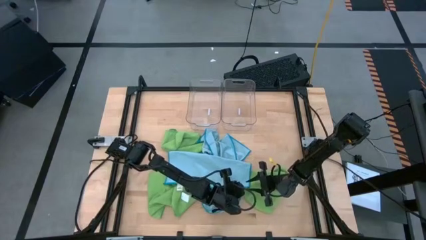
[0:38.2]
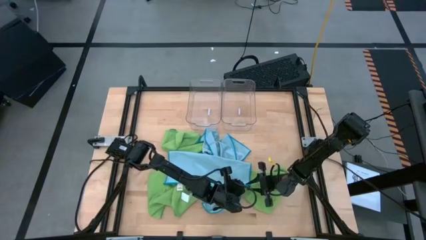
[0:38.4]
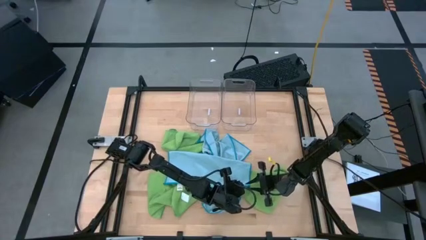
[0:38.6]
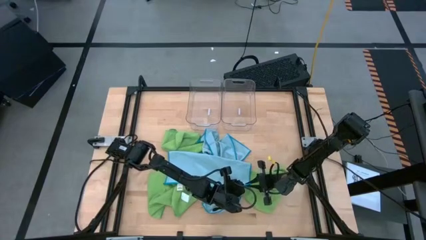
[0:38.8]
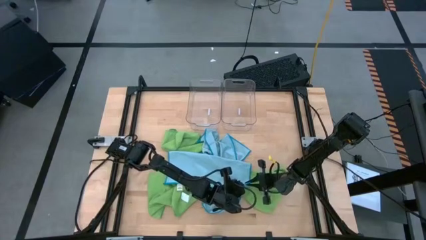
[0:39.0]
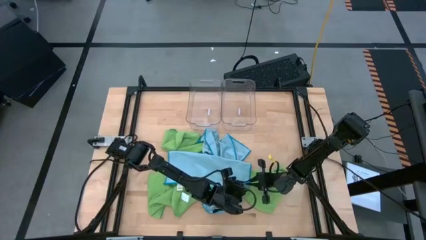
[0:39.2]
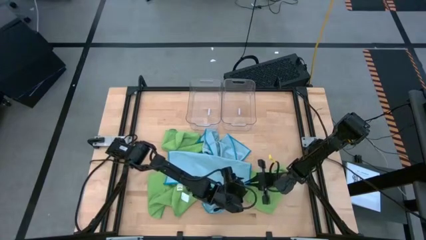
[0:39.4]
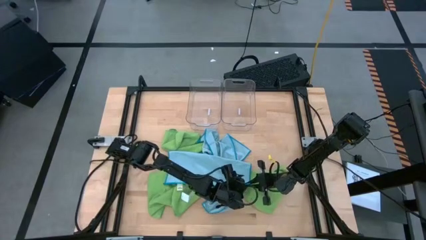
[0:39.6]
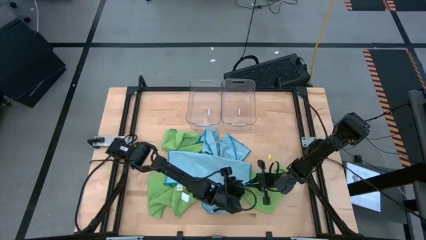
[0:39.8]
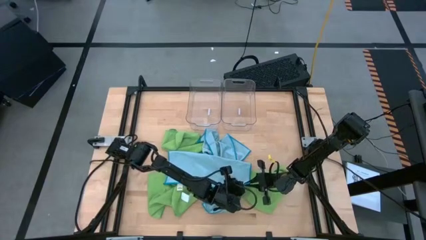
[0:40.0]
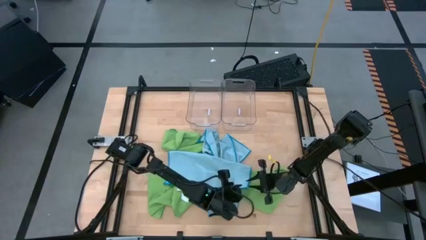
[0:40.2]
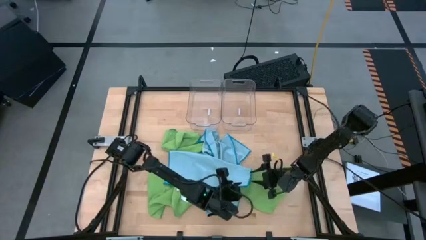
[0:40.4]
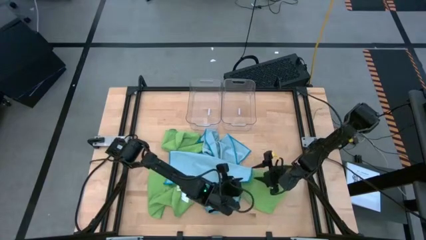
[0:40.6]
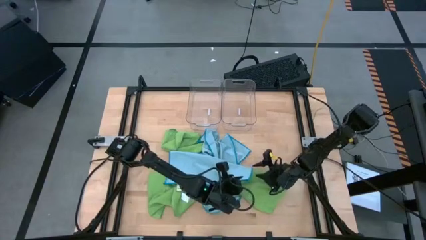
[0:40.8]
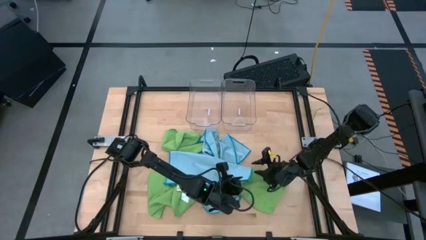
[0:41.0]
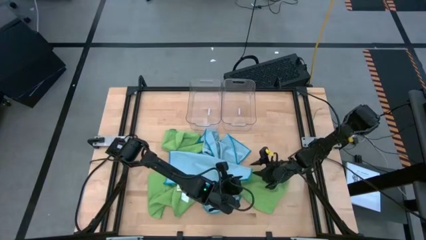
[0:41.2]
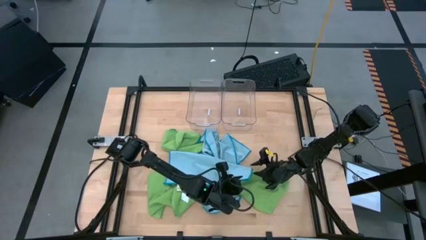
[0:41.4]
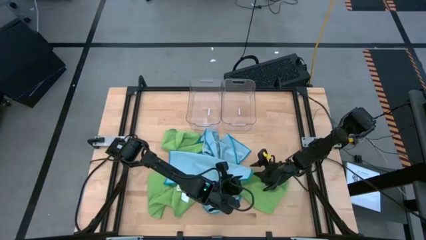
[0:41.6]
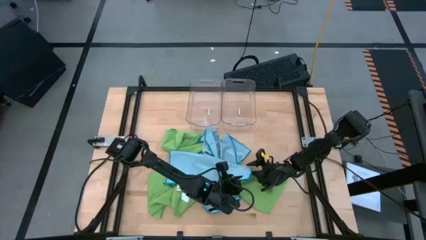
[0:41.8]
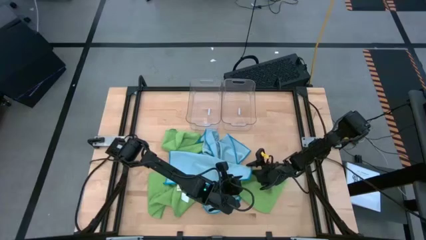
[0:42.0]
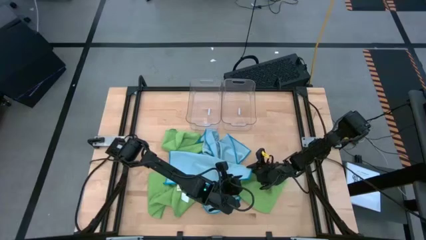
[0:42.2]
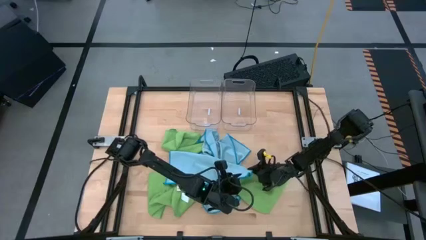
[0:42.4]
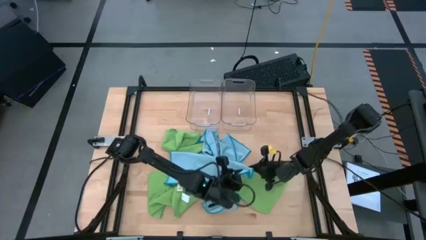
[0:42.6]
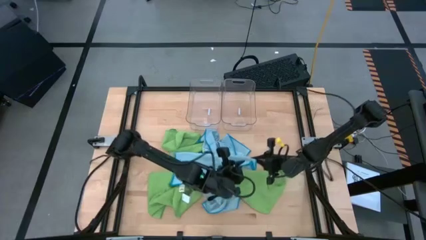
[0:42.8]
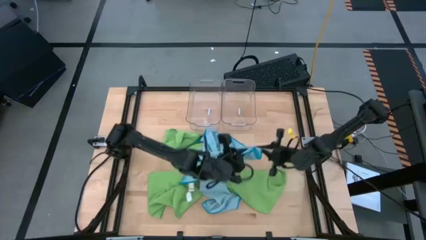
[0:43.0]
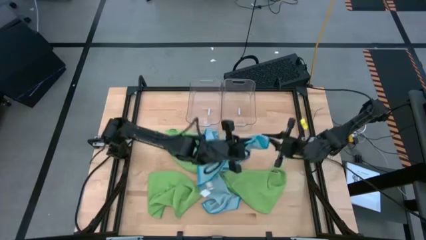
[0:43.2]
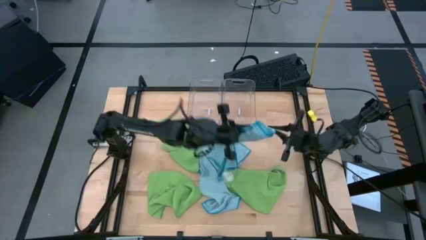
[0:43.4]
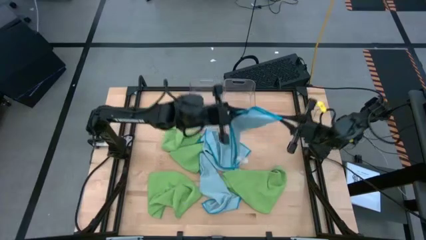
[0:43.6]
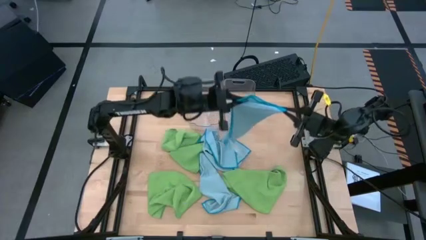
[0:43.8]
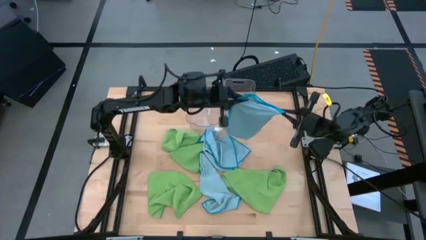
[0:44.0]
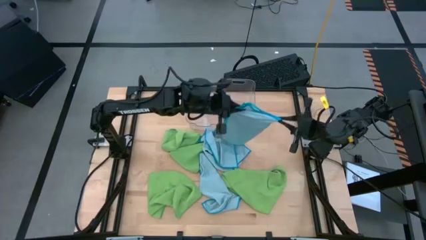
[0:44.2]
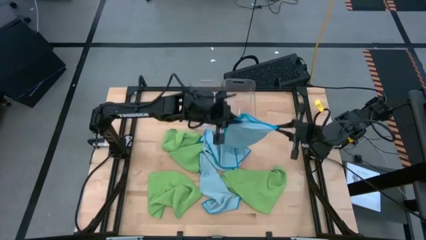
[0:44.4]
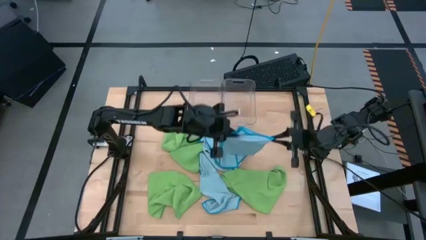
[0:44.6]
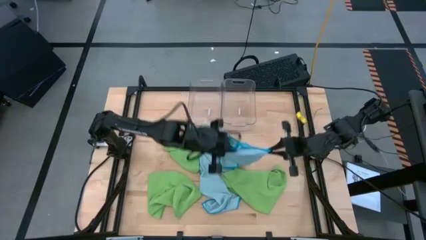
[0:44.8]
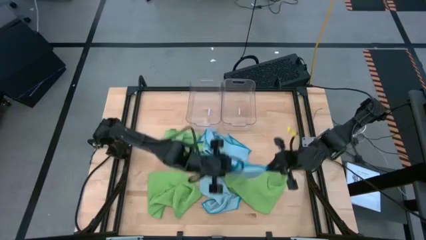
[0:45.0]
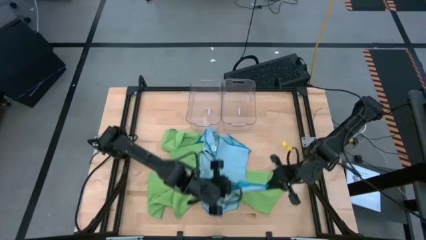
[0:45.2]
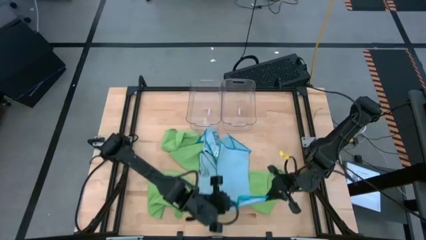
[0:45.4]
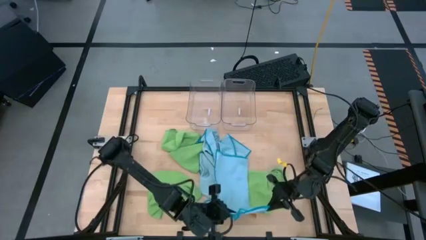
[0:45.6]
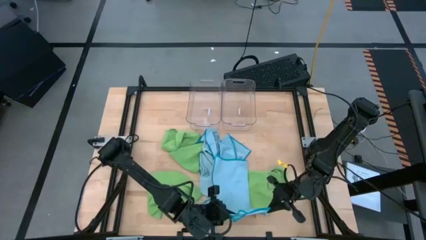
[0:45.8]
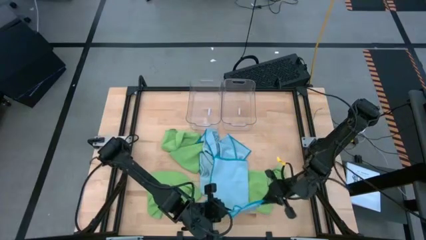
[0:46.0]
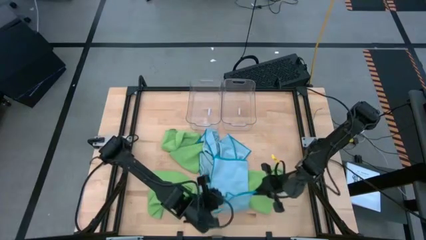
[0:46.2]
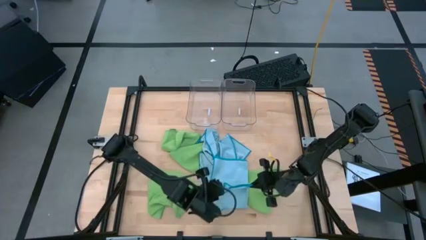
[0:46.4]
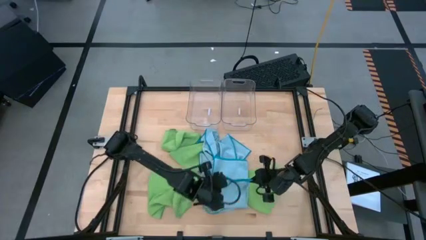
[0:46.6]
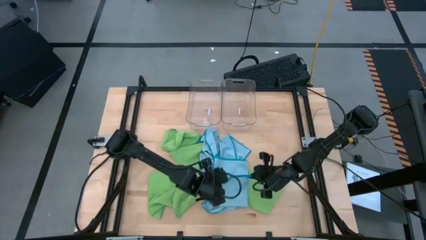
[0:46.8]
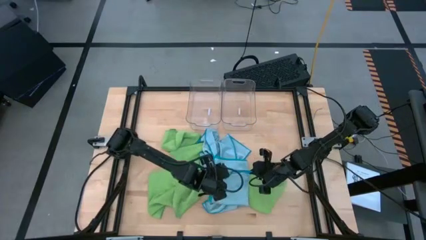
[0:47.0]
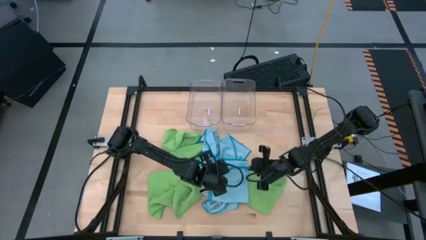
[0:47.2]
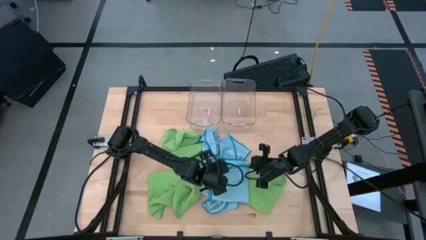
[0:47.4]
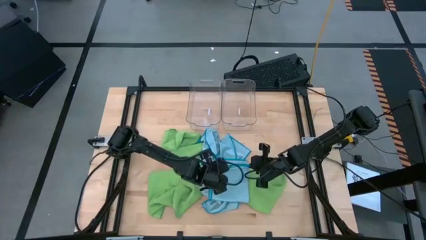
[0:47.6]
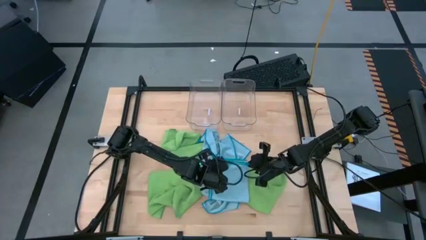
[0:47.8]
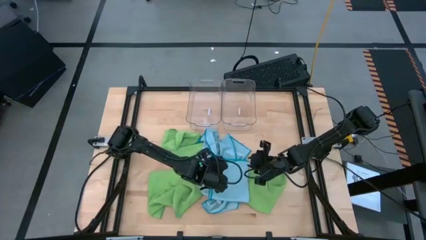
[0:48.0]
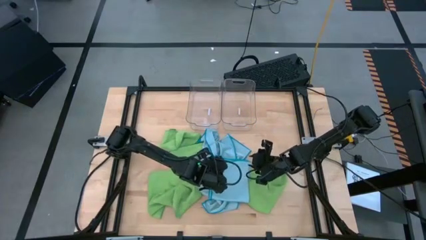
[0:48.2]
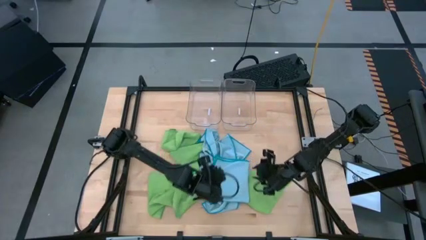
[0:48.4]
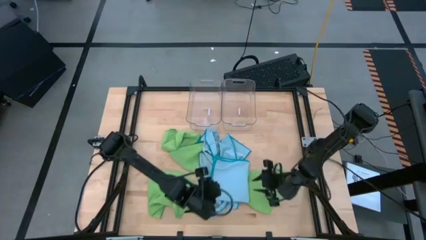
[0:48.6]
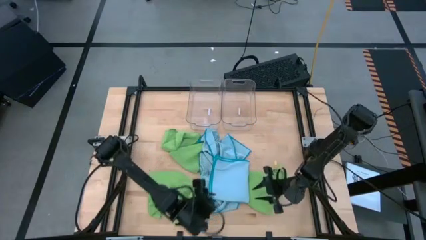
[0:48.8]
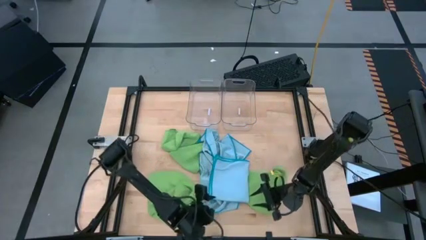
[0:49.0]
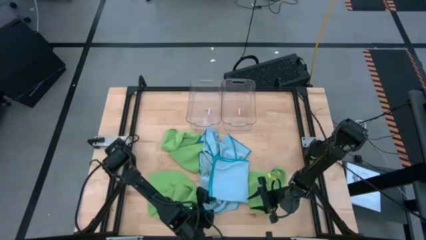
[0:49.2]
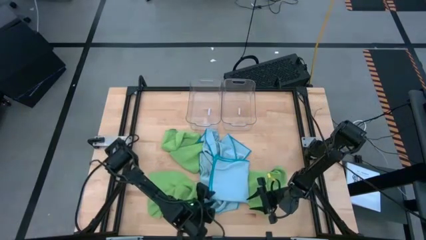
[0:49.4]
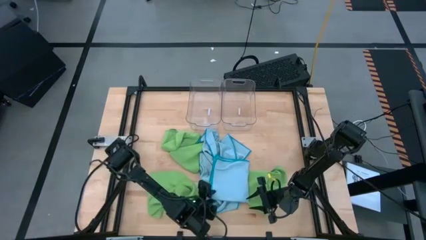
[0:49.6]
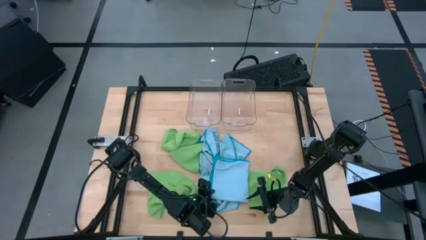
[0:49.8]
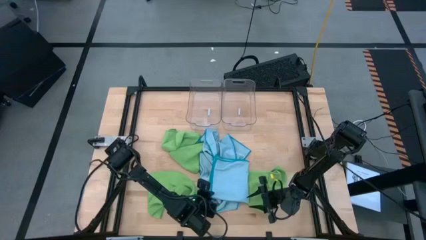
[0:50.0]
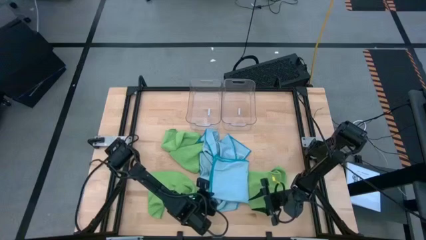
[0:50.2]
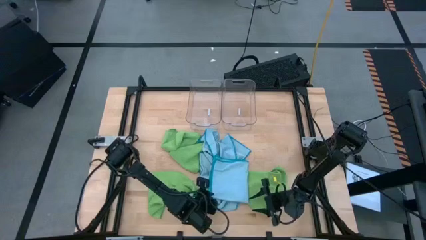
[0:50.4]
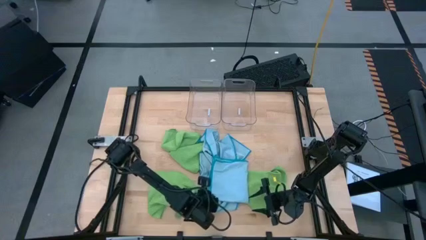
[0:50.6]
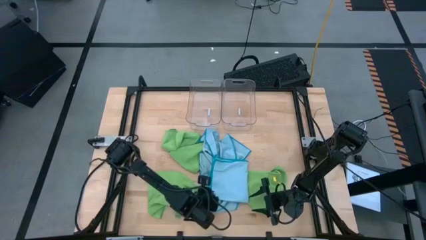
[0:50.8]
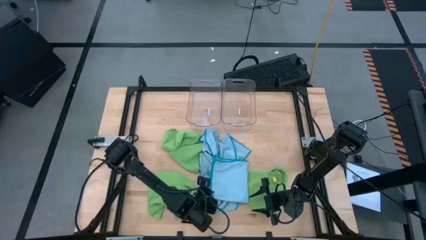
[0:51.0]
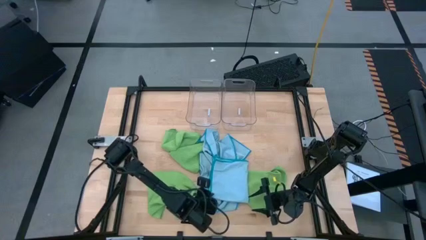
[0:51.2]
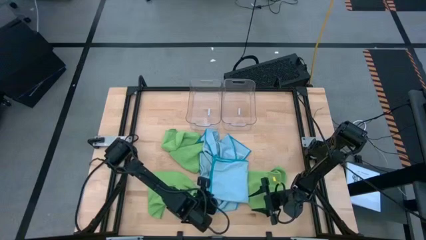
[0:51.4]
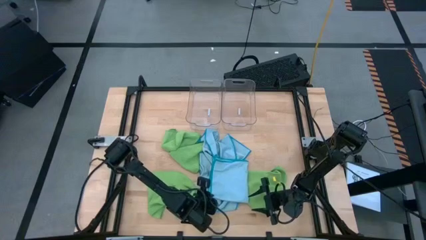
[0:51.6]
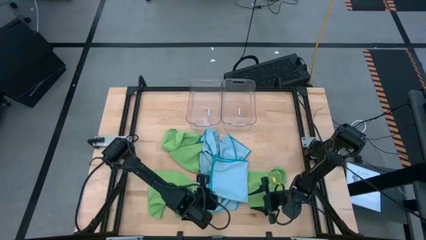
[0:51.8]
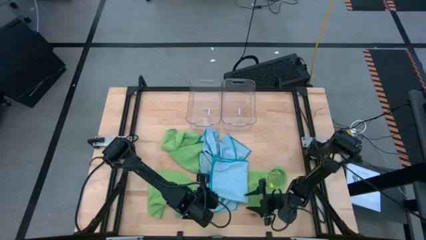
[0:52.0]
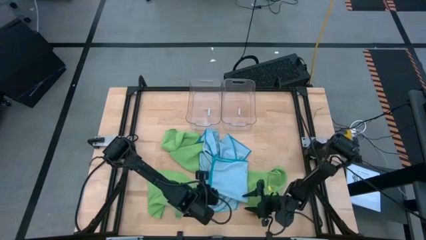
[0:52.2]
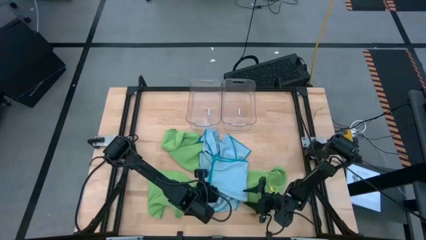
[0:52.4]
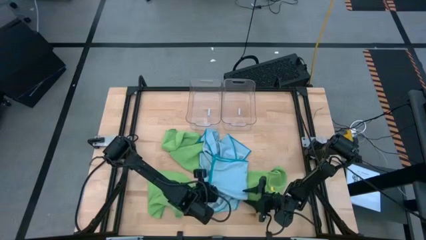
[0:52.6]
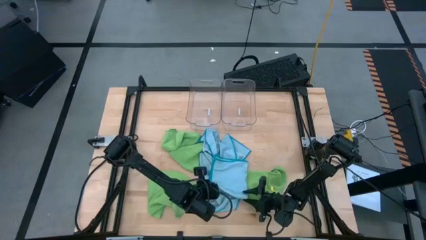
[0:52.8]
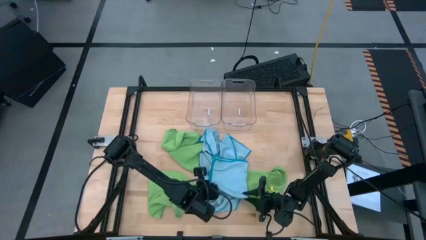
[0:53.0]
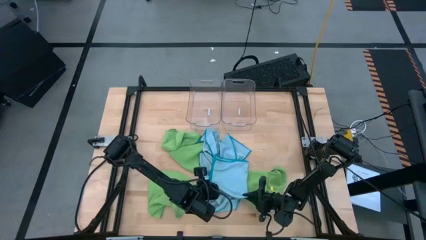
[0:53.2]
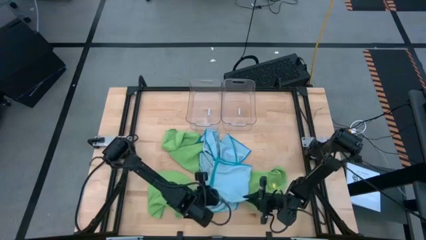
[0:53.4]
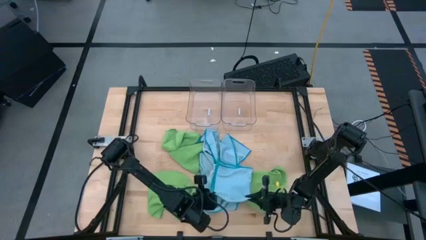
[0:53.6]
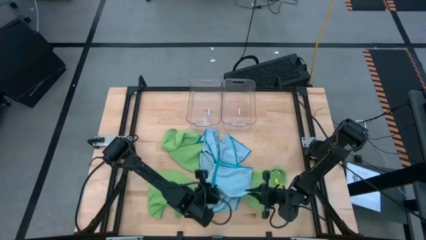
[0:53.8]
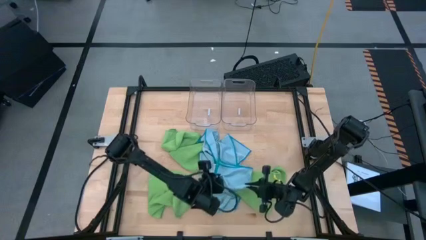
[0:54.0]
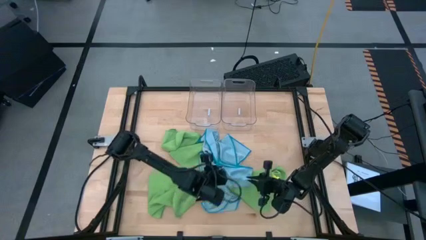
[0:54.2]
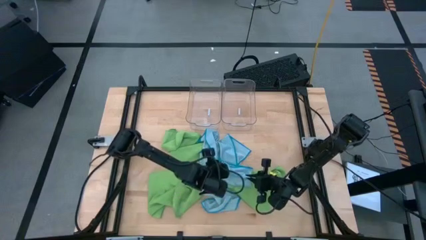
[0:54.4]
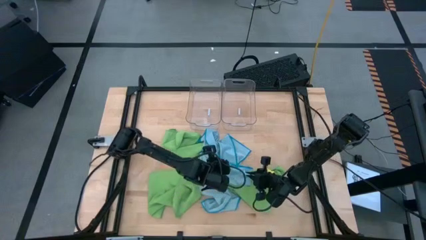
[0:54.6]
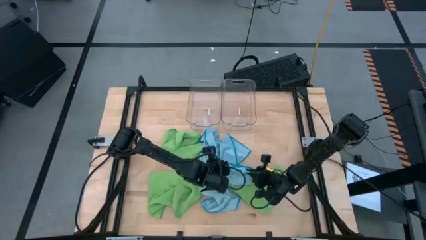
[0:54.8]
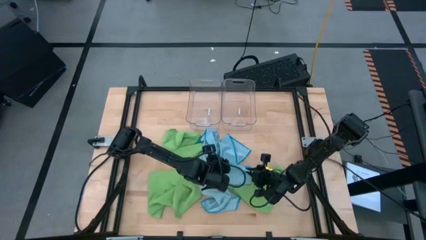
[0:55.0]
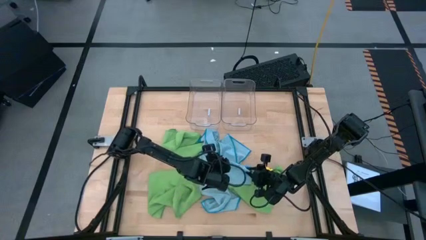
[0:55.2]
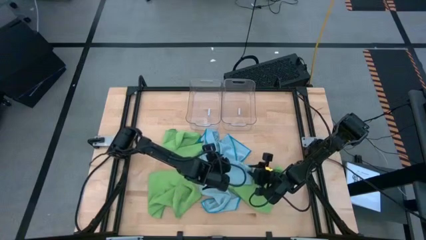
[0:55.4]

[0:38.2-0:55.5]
Task: Fold microfiber towels
Fold the top right blue microfiber towel
